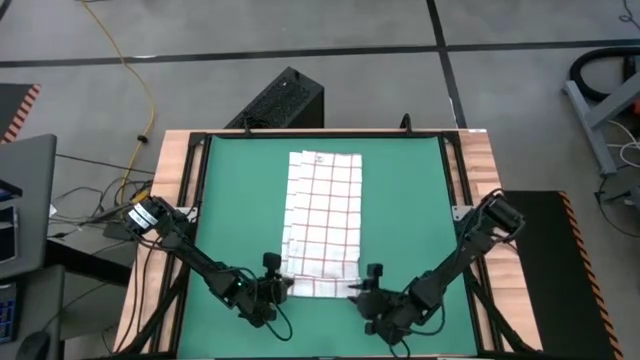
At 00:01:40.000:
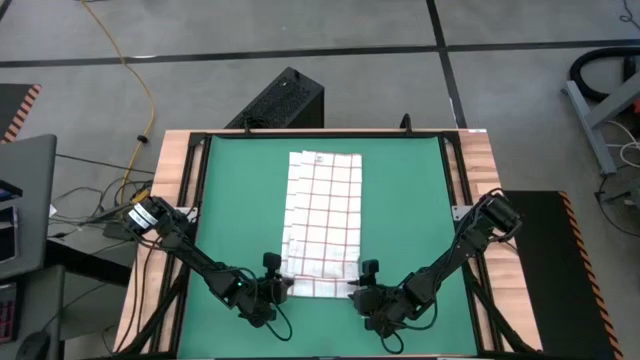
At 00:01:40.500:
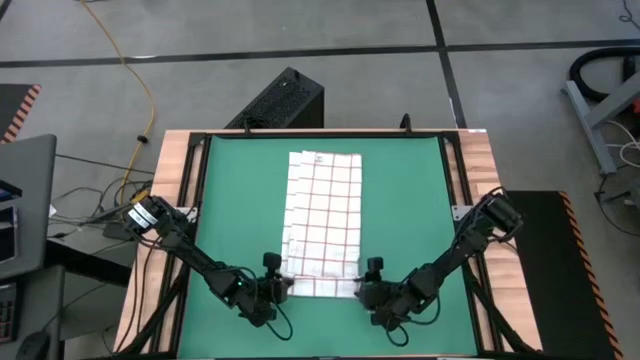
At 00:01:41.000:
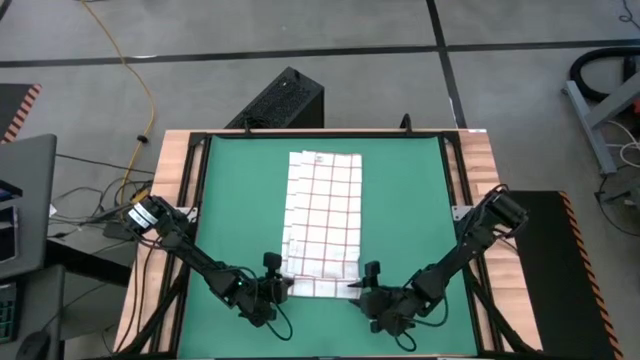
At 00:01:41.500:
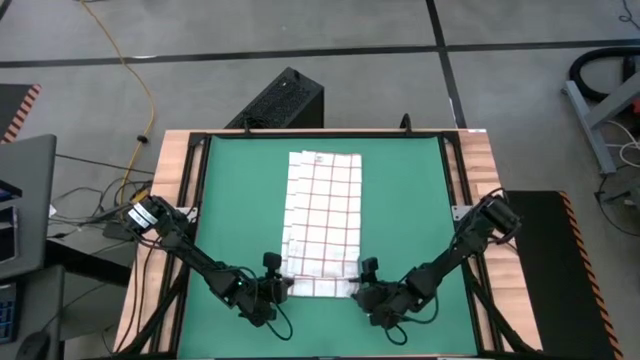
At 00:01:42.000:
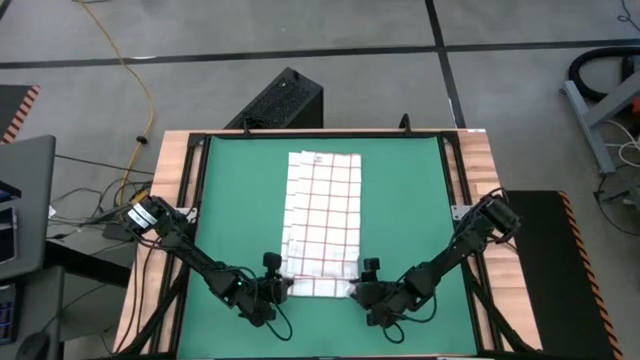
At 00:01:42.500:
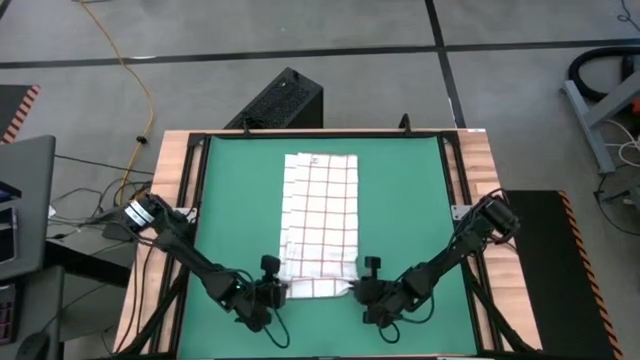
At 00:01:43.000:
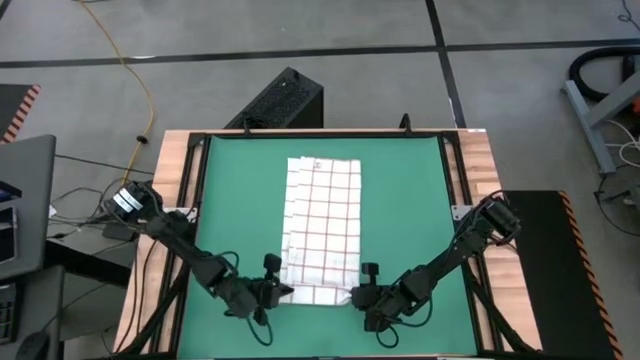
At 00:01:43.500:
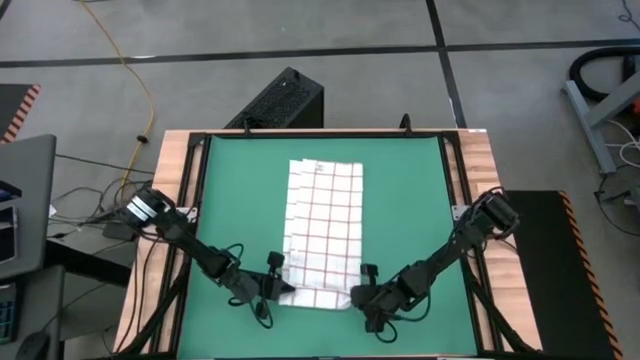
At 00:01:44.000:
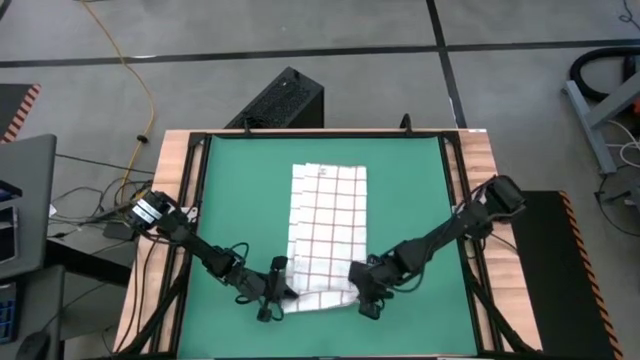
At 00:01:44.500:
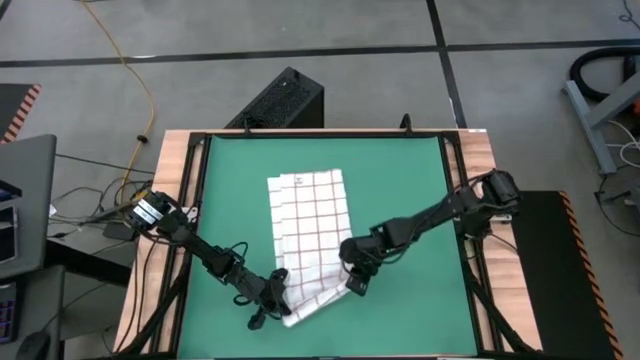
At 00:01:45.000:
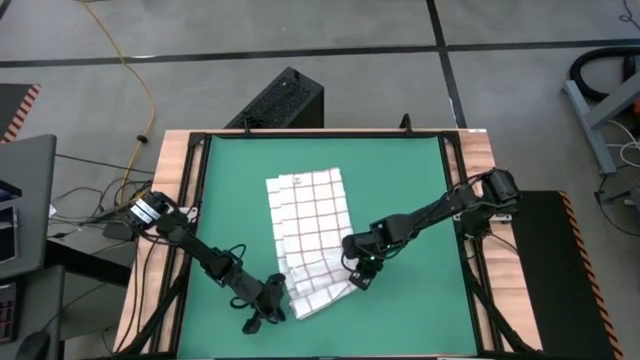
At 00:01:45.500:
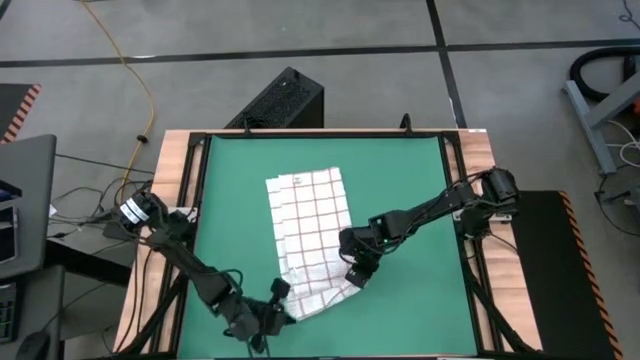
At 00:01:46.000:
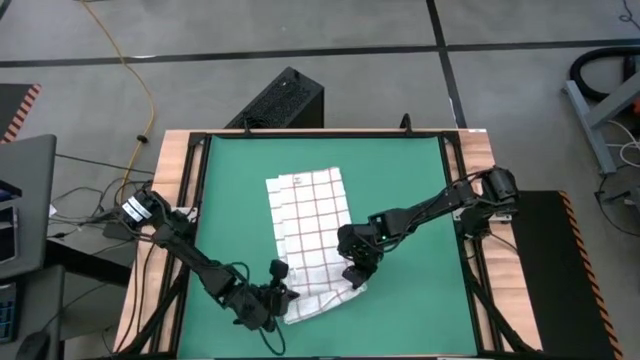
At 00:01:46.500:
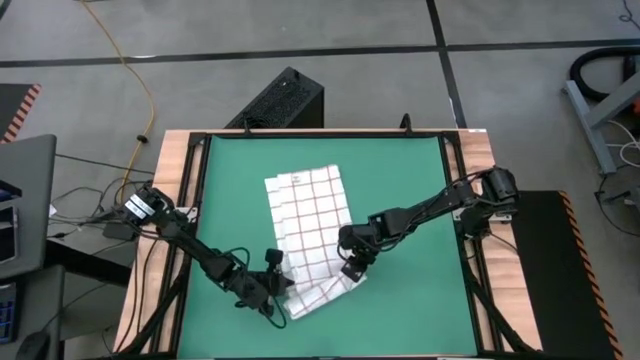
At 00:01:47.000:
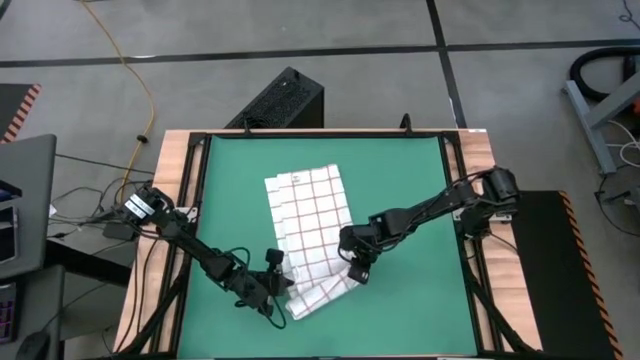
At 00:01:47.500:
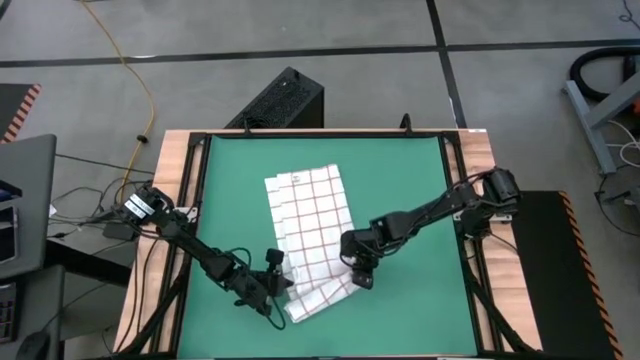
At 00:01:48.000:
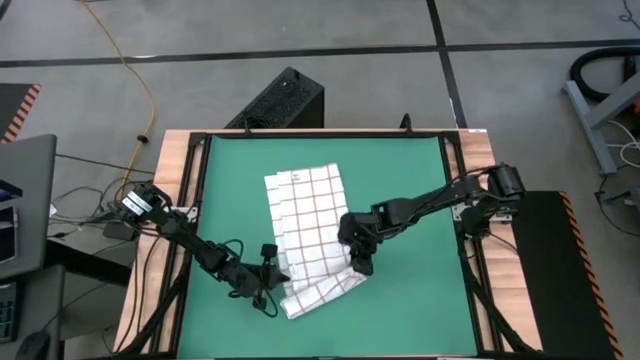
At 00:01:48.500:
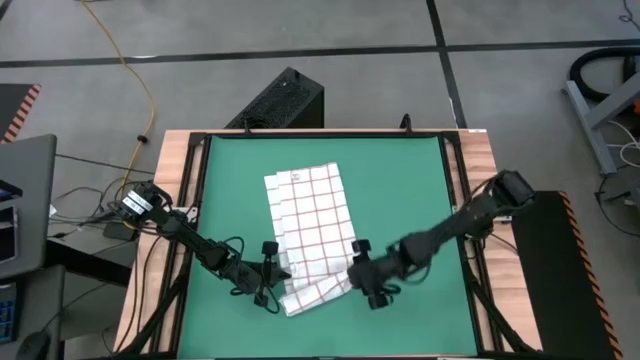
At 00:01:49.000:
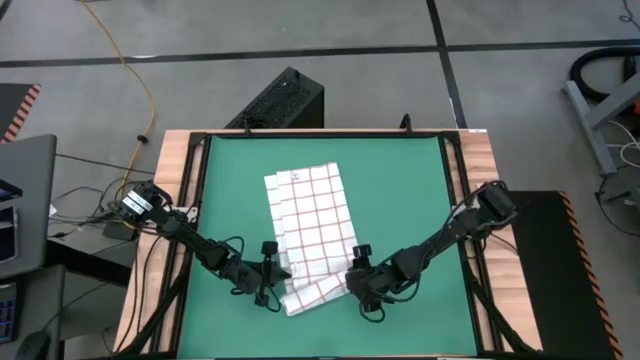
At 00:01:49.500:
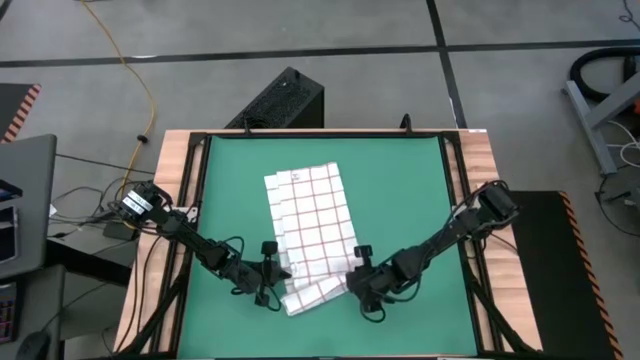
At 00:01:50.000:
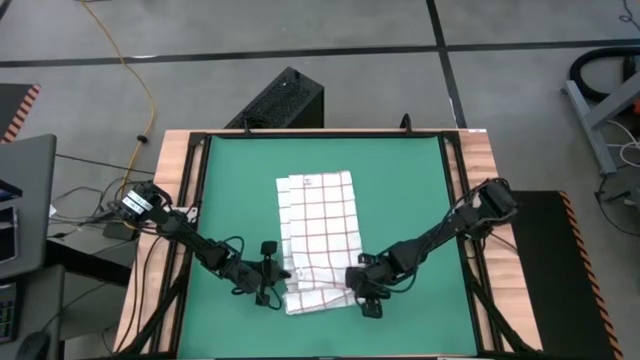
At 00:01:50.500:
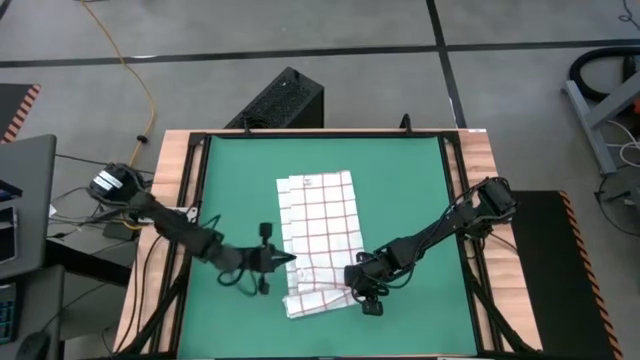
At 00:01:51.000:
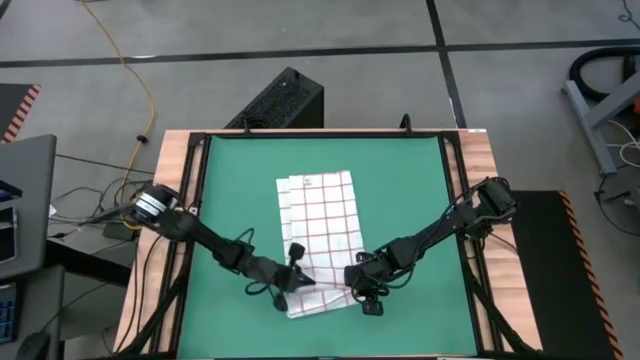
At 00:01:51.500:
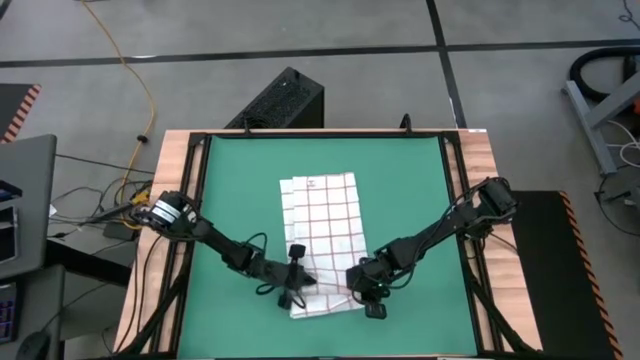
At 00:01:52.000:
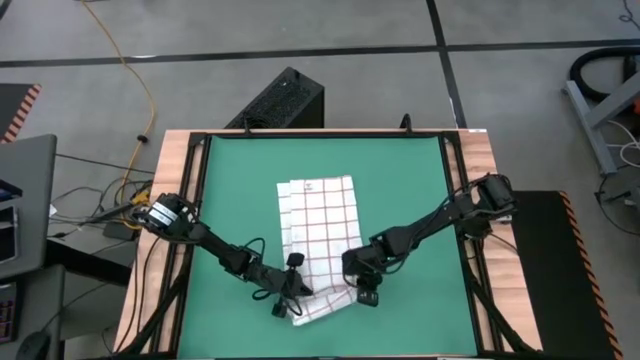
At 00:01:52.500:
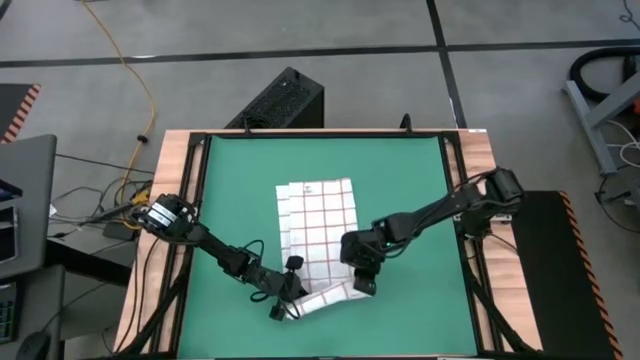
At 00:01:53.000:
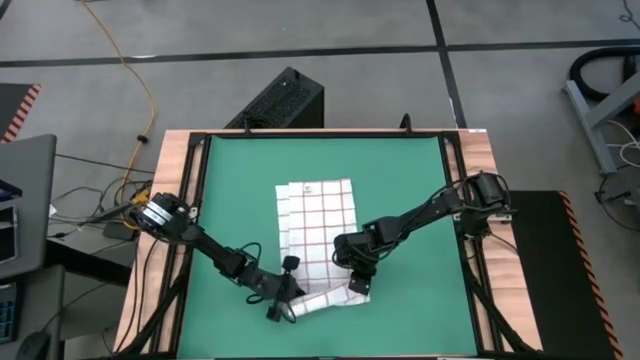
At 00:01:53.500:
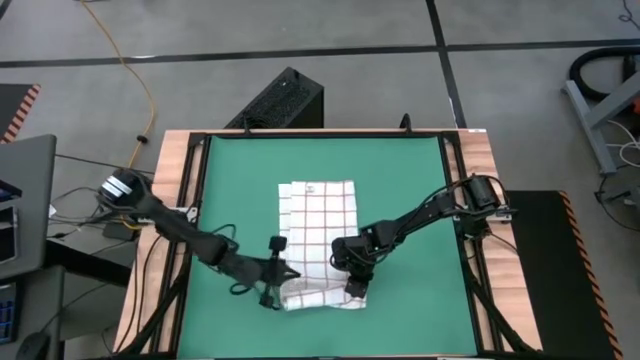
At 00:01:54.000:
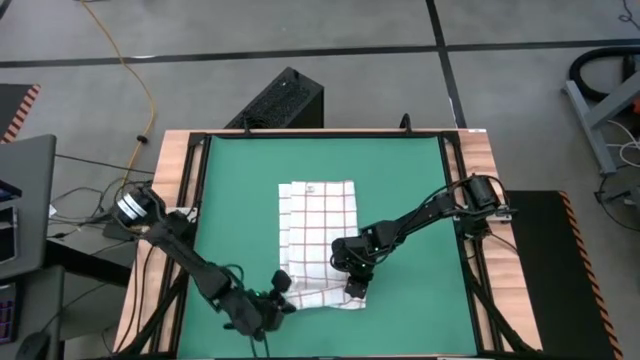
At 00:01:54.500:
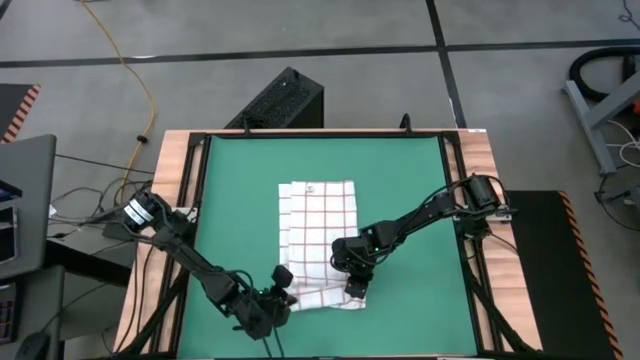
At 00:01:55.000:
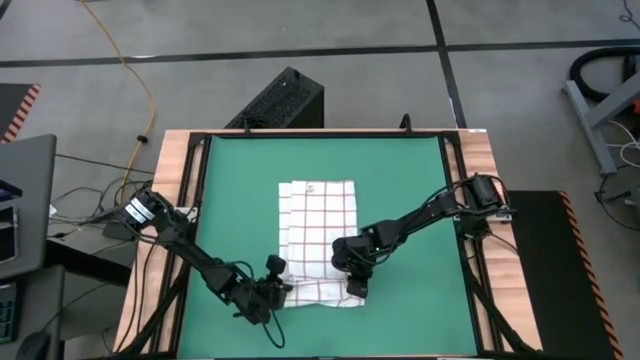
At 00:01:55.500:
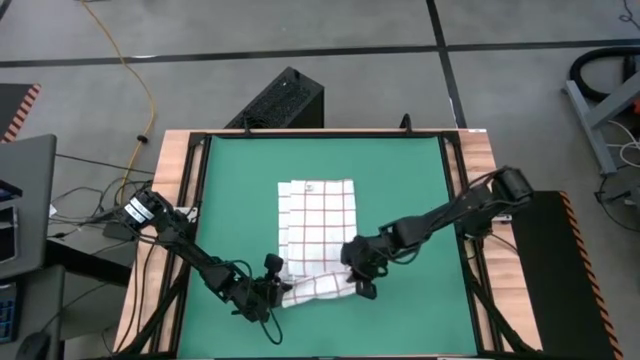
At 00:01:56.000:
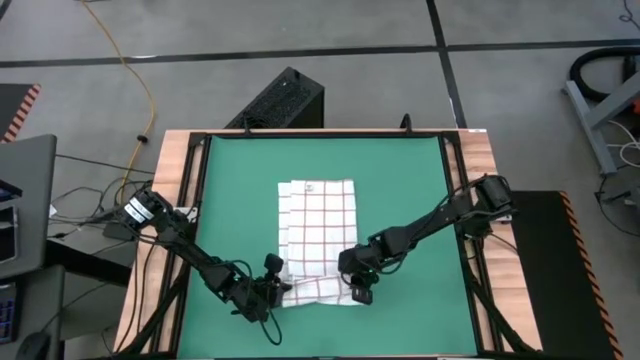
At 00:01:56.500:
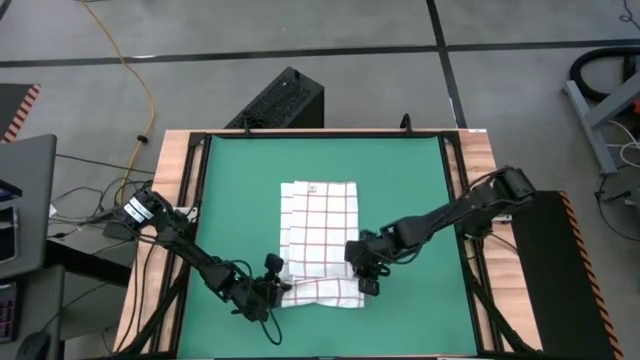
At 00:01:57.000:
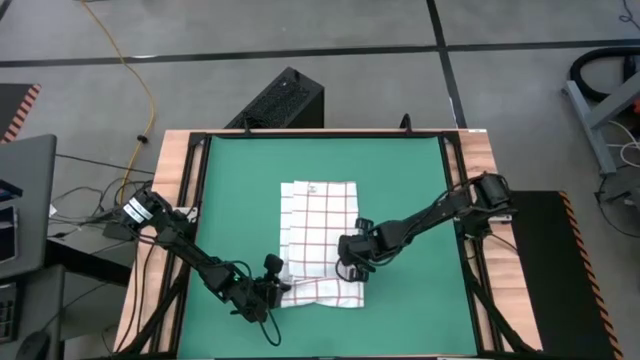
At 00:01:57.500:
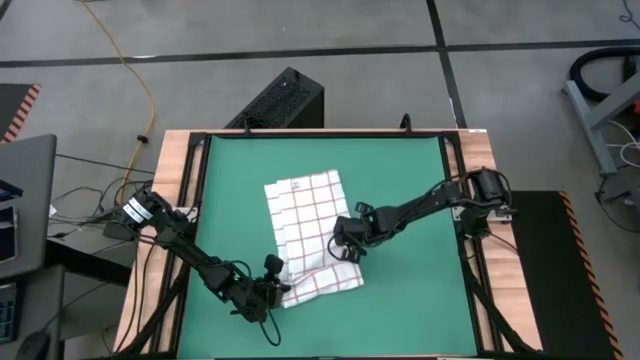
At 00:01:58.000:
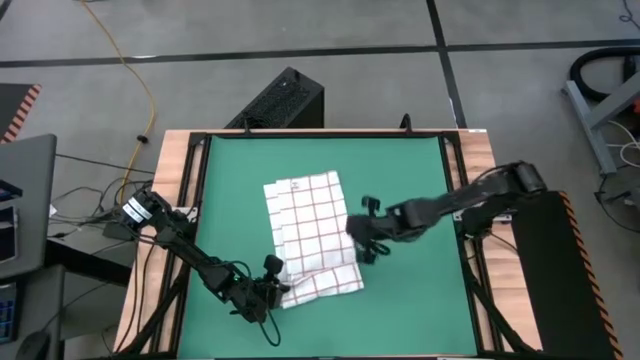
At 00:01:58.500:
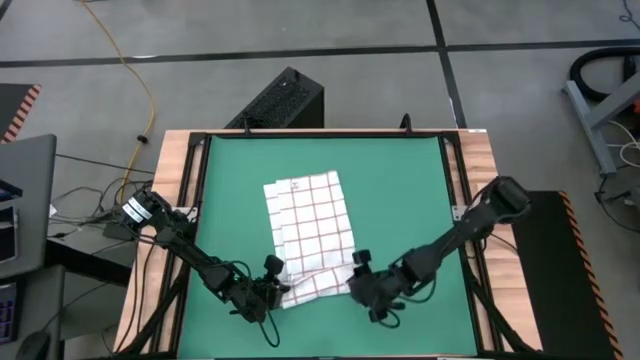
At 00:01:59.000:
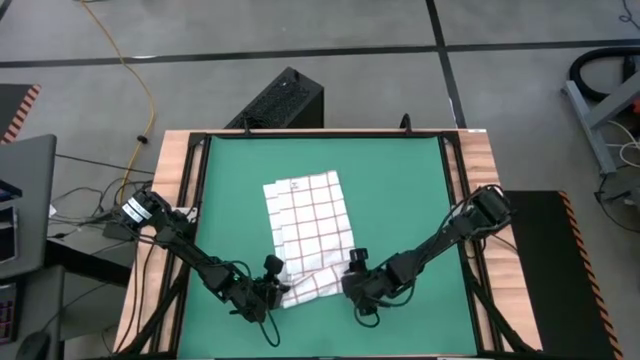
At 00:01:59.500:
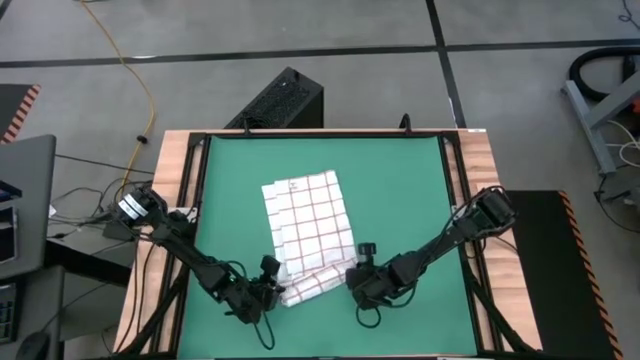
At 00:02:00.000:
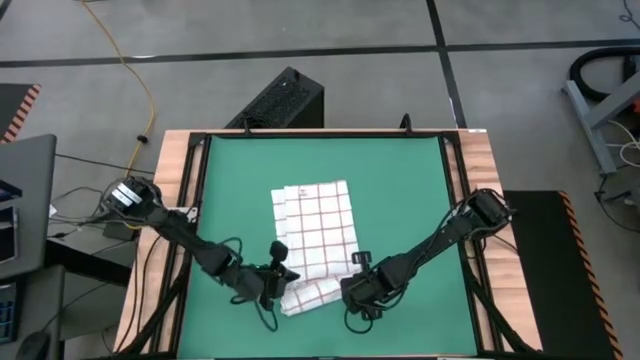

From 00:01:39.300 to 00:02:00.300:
Task: Roll towel
Roll the white towel
